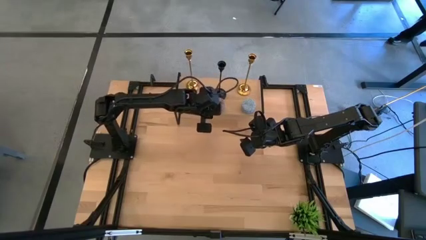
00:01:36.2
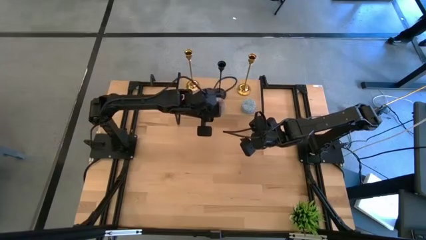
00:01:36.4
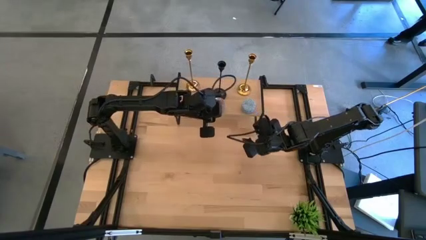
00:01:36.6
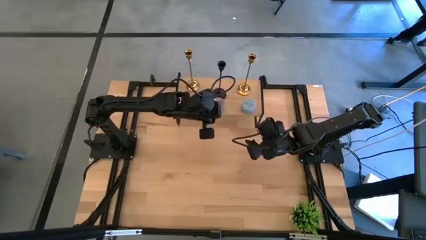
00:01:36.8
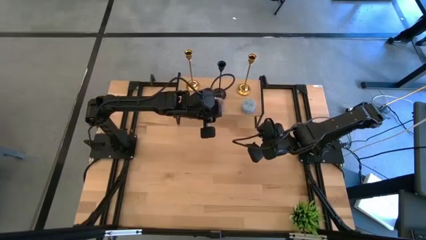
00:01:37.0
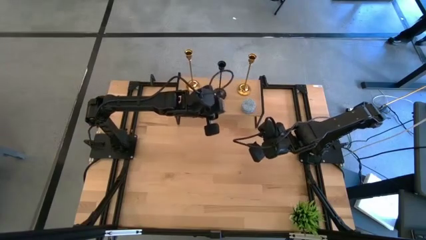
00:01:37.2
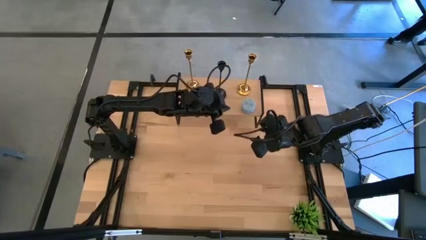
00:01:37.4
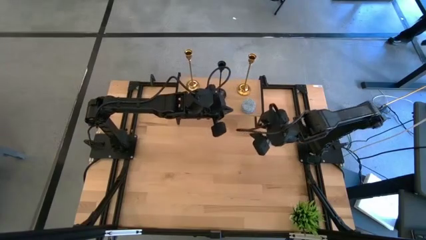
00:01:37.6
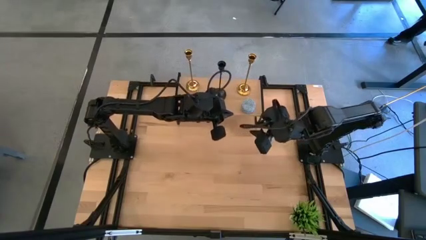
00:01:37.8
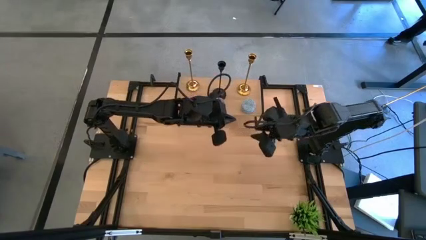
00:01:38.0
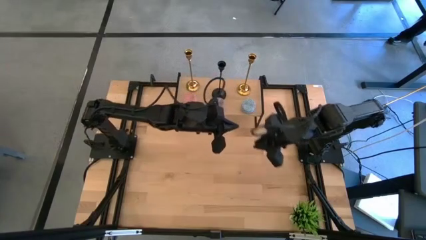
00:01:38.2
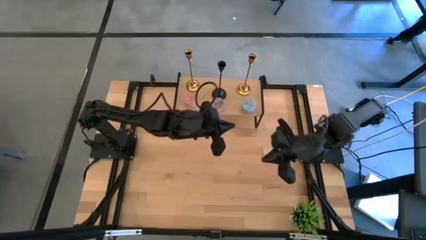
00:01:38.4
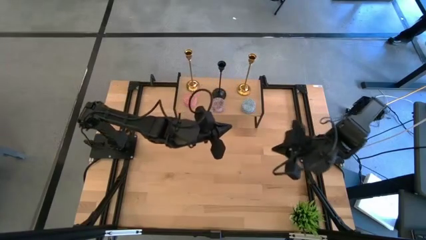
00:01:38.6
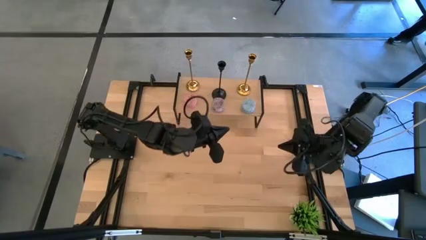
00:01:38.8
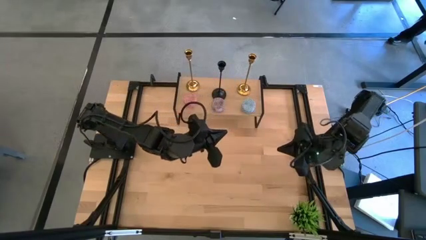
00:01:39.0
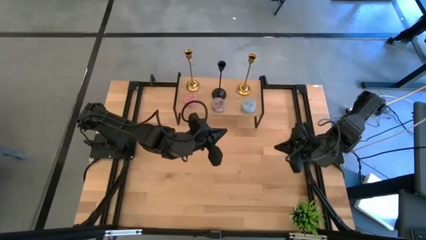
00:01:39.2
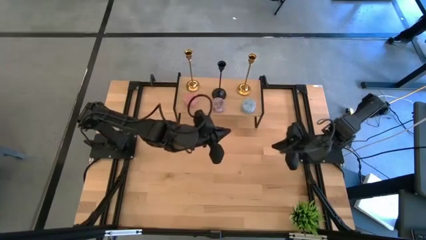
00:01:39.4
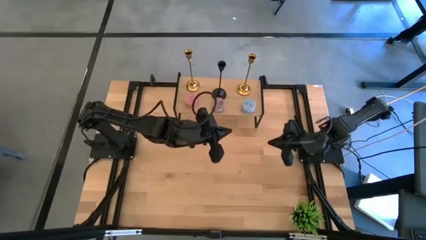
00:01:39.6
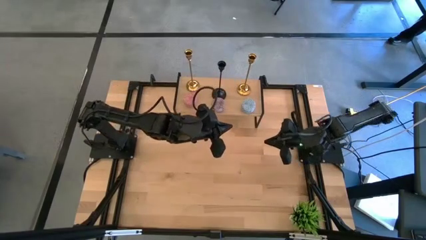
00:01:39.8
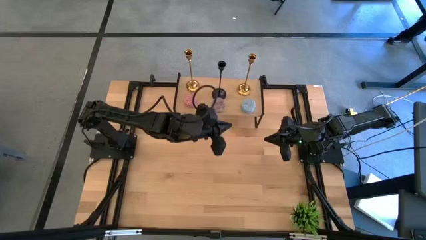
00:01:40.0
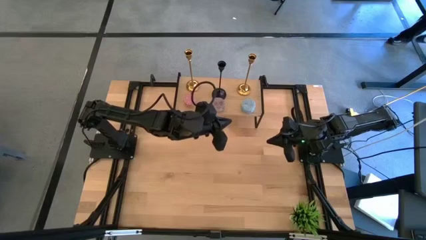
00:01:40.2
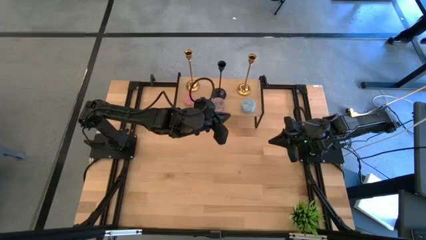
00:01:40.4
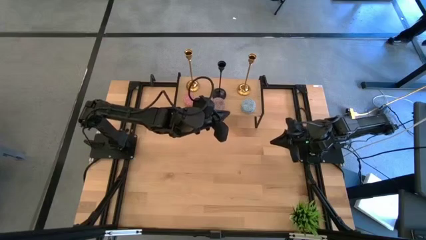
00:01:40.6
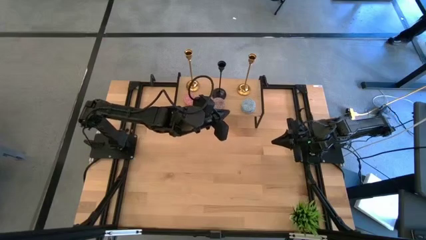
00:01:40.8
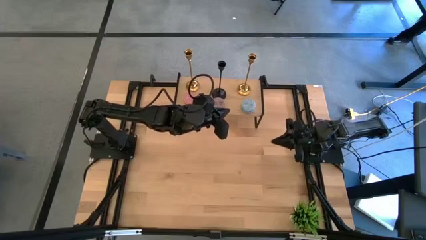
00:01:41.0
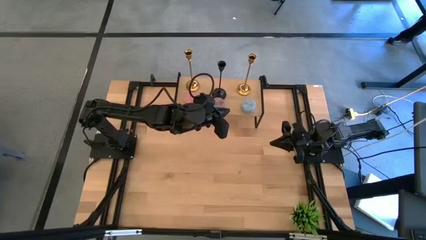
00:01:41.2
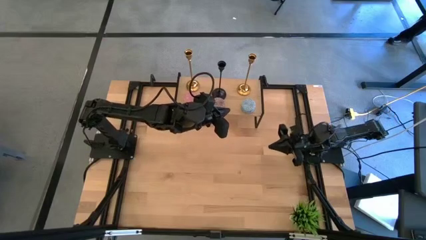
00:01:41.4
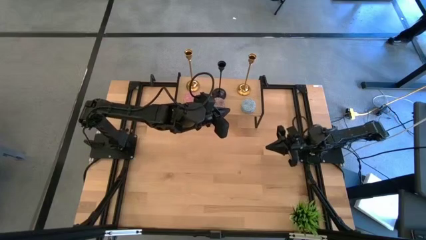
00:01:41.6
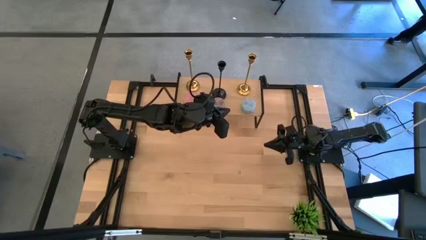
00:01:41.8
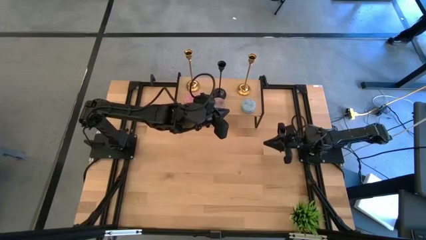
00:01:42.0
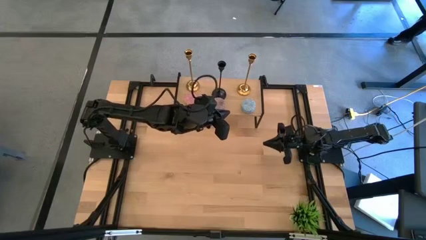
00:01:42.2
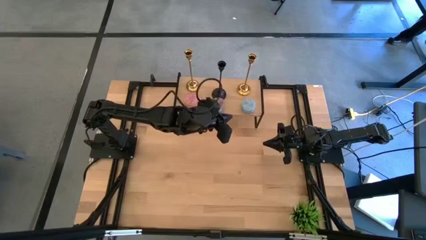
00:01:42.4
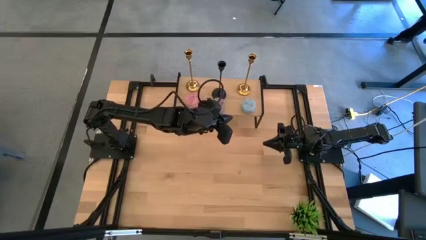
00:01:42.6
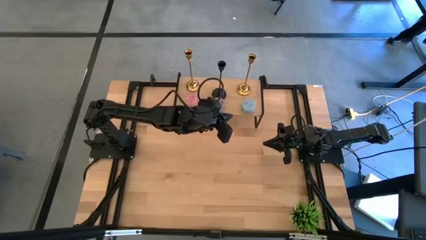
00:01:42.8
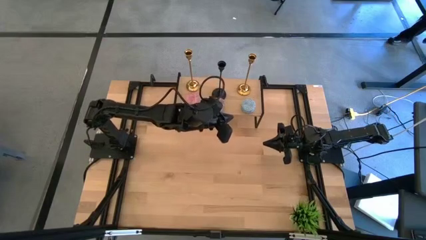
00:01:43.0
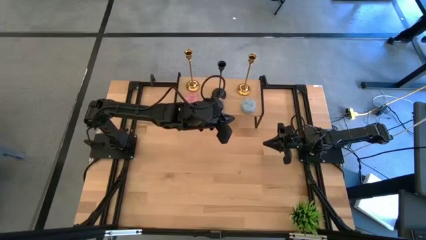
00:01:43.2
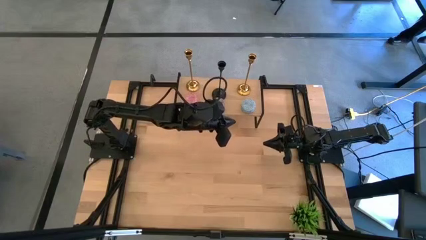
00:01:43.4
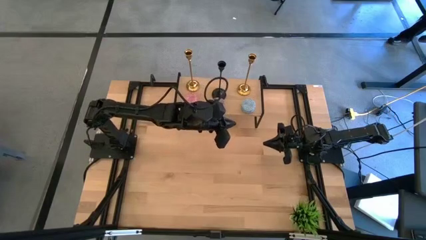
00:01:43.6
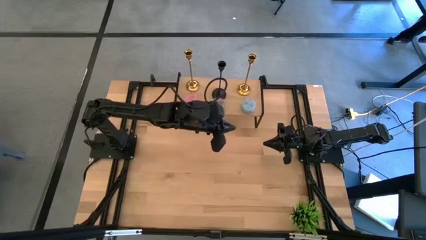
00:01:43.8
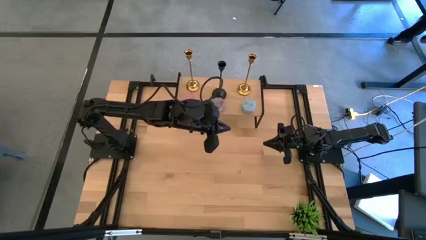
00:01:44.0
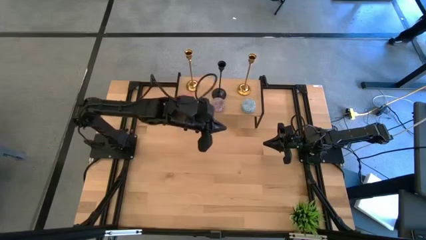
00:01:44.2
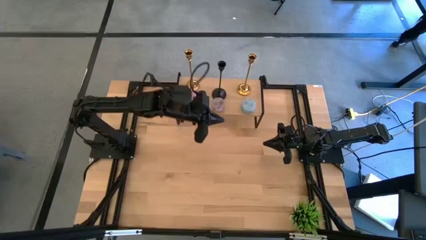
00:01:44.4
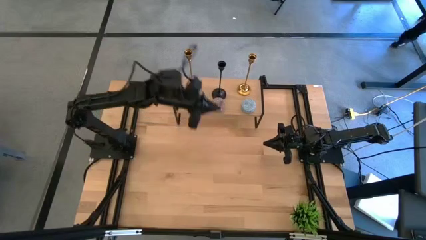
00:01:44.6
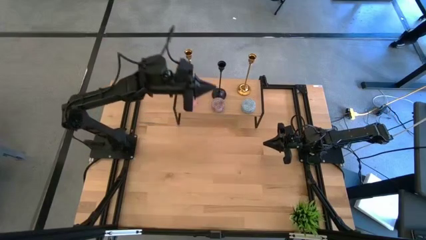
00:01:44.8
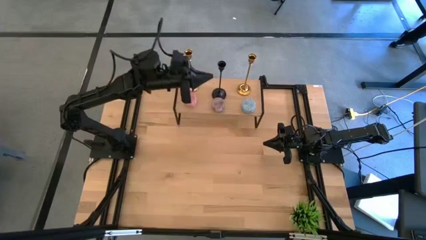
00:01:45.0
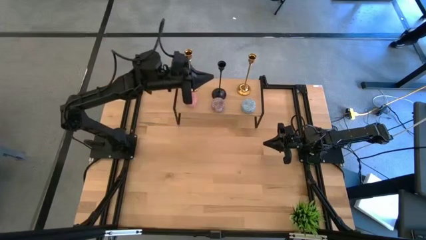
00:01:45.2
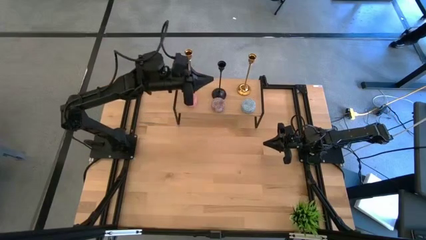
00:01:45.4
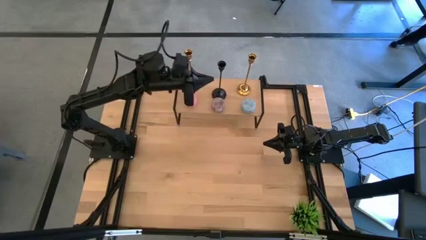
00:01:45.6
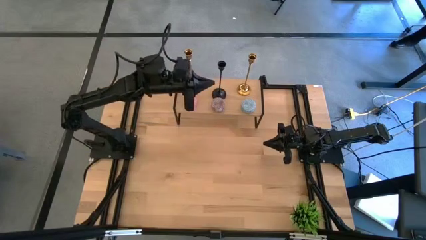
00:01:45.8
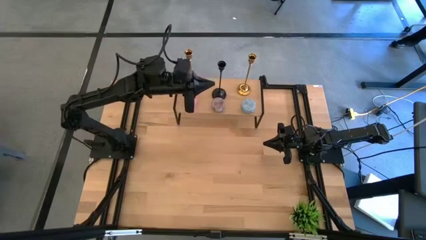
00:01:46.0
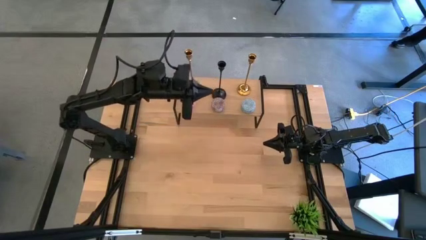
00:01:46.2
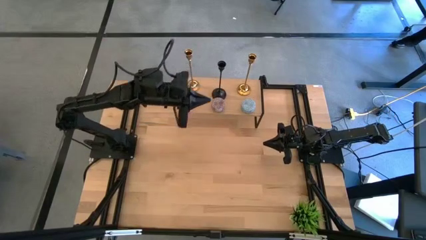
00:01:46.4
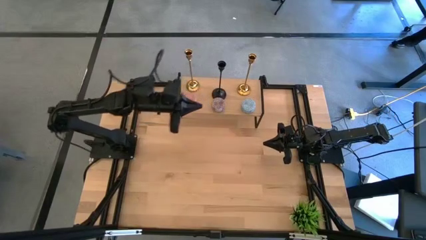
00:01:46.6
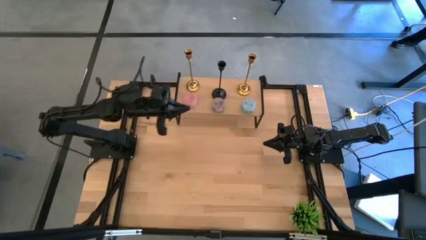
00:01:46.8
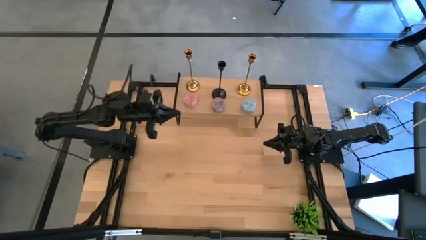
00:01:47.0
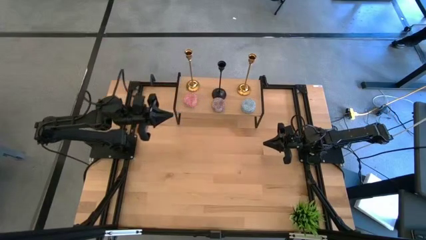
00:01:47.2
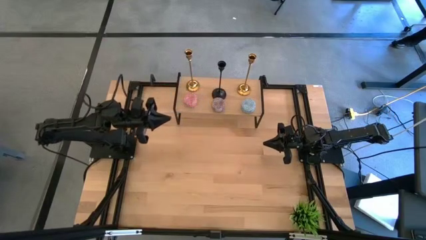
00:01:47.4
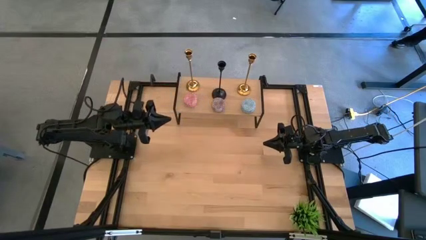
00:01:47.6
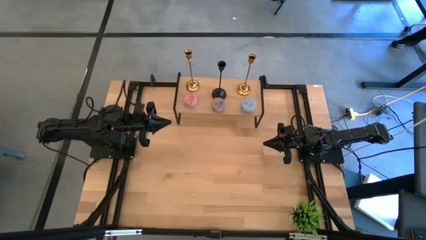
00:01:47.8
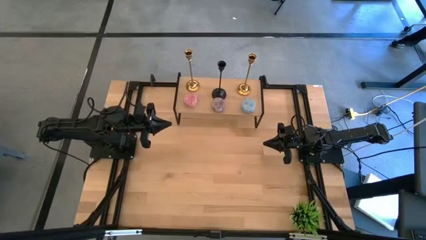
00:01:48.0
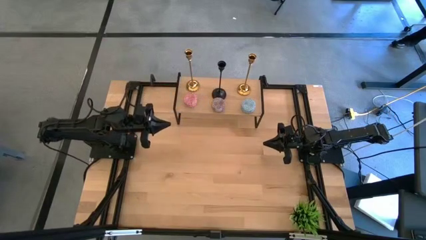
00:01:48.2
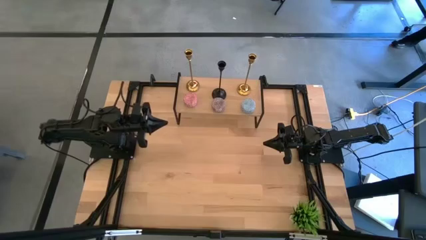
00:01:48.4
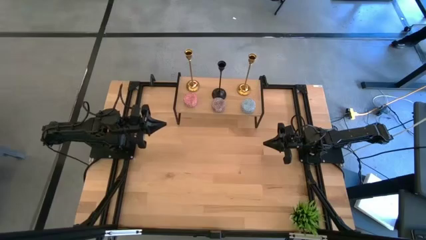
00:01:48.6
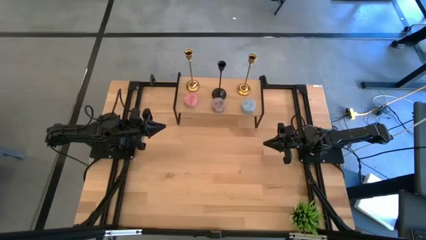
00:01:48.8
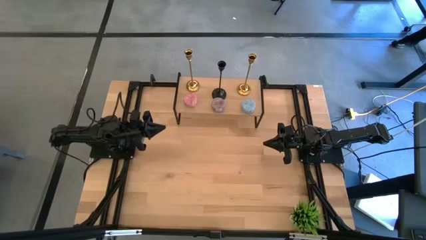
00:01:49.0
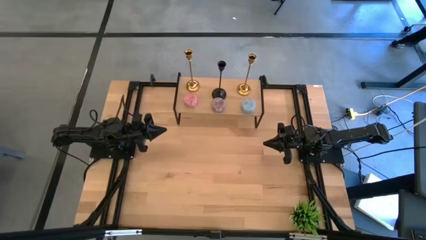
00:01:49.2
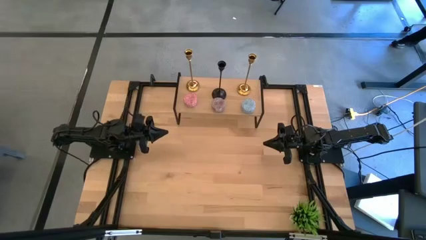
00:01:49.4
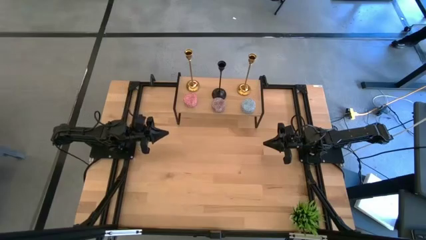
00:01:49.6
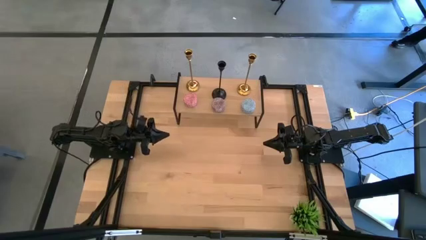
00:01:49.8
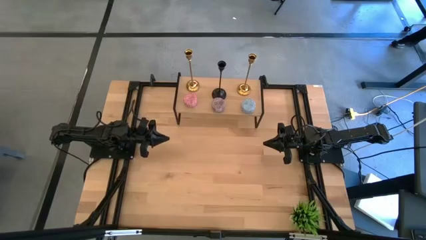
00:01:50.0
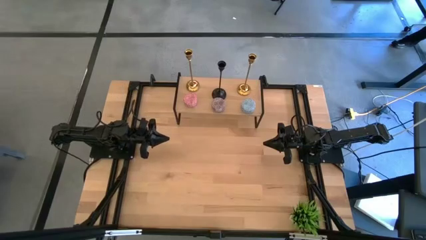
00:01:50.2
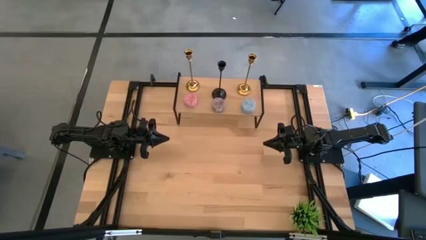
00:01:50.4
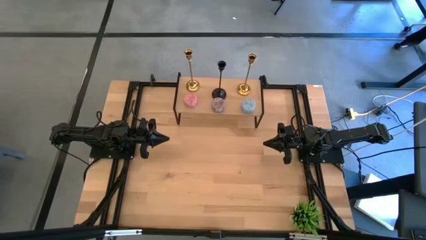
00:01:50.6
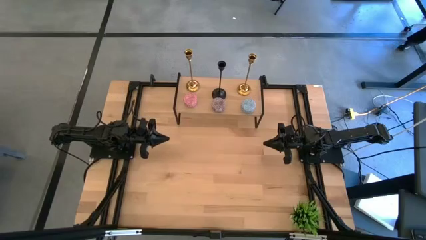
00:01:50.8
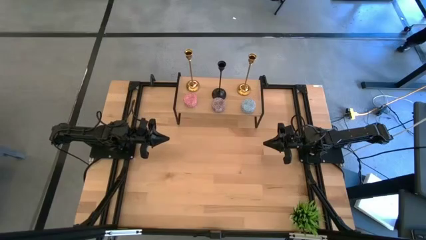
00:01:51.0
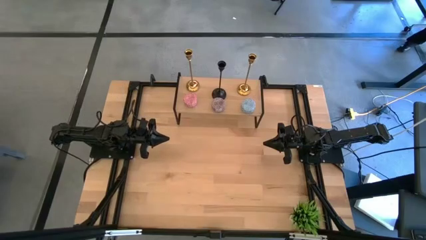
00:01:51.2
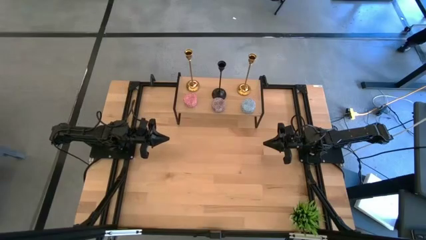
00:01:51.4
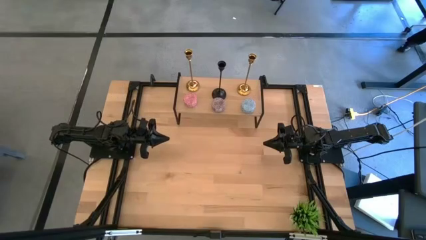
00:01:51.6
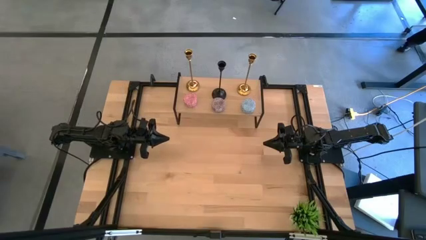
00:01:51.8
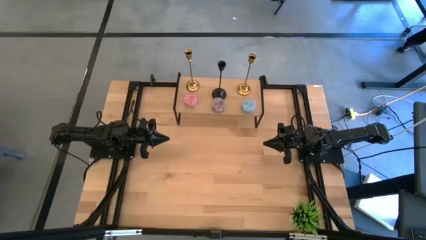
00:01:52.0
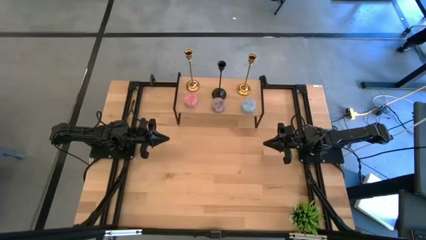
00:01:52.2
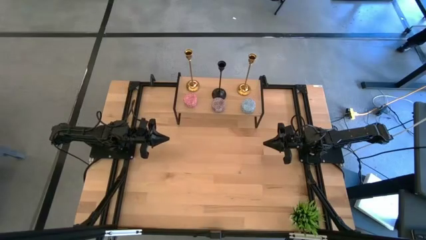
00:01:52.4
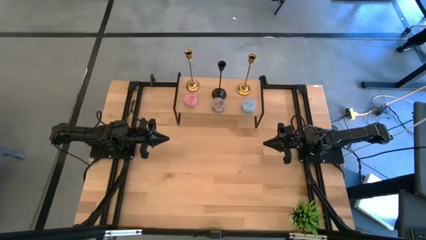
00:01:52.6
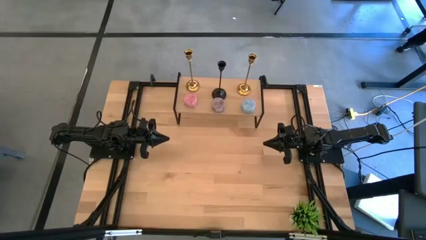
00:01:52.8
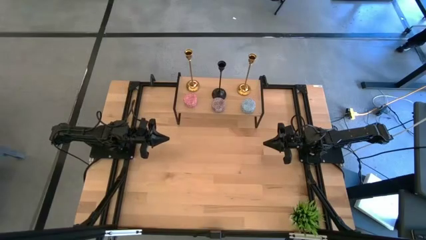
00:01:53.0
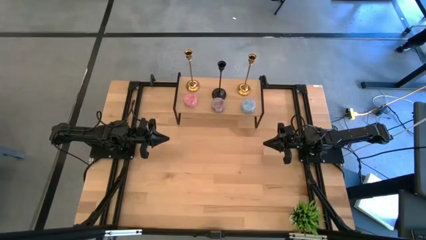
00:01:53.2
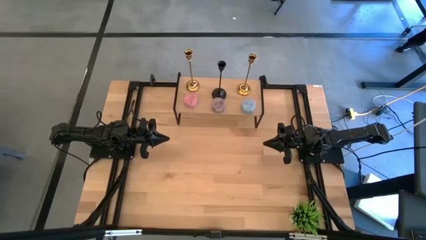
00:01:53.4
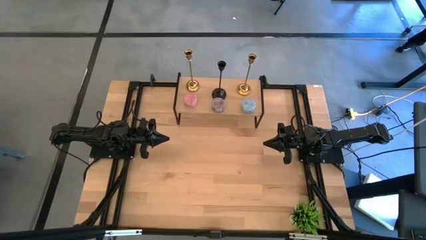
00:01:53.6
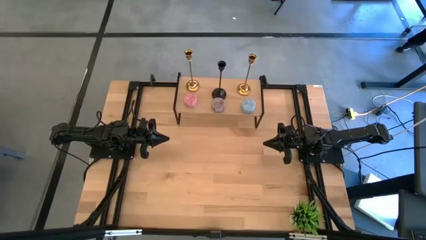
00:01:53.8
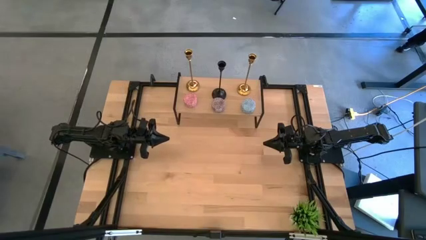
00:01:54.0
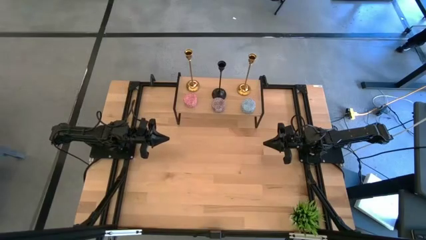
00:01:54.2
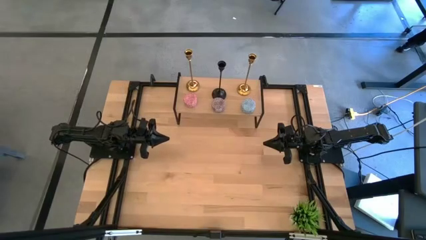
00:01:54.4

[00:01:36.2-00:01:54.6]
Task: Pick & Place candle stick holders
Return to Home Position
